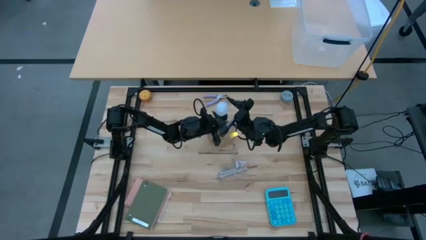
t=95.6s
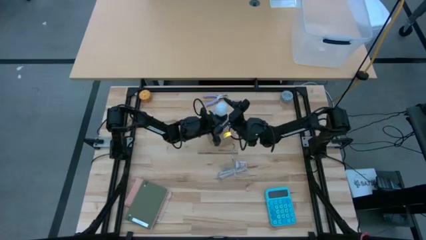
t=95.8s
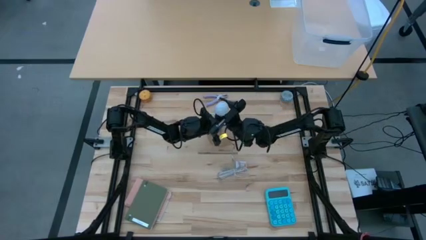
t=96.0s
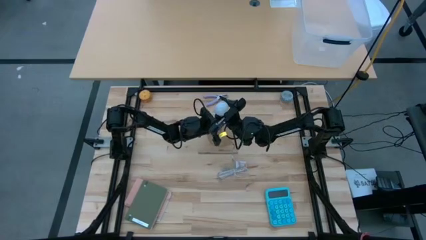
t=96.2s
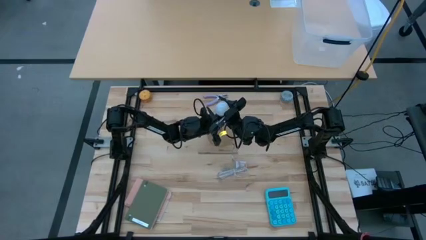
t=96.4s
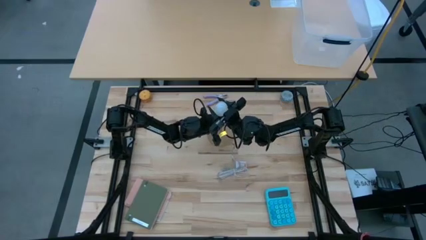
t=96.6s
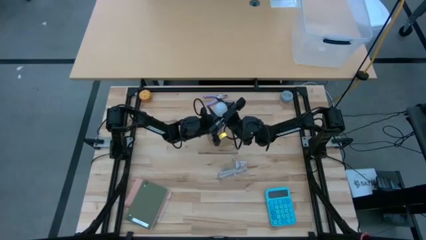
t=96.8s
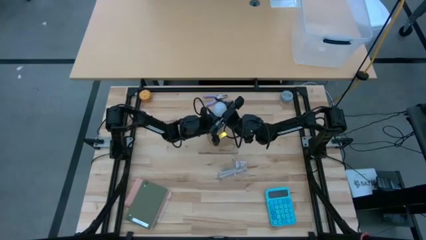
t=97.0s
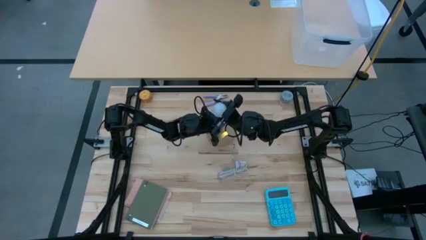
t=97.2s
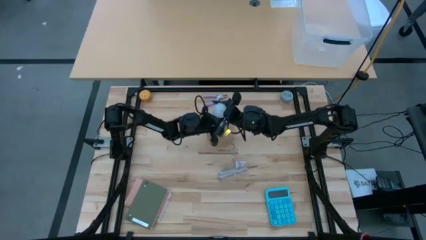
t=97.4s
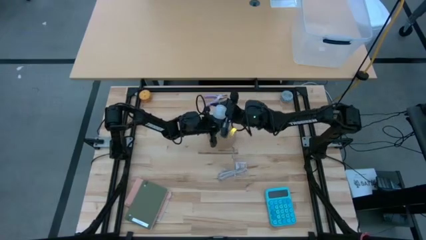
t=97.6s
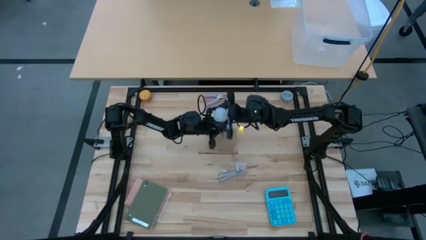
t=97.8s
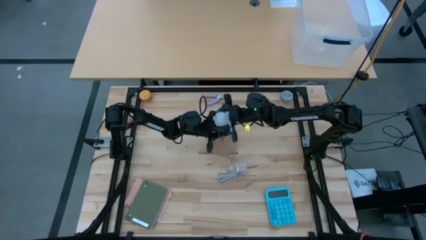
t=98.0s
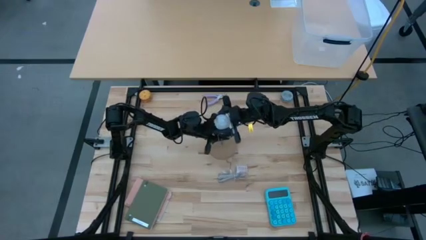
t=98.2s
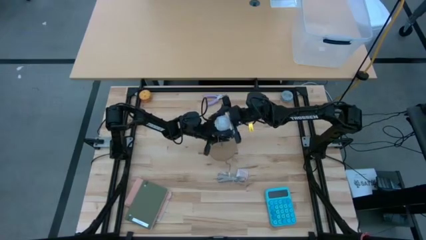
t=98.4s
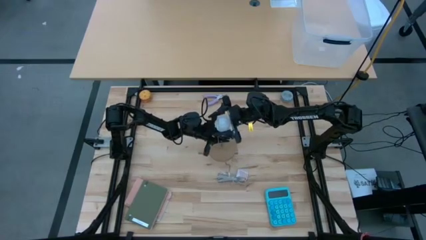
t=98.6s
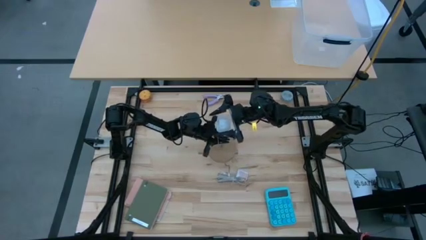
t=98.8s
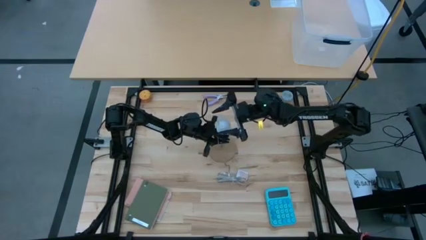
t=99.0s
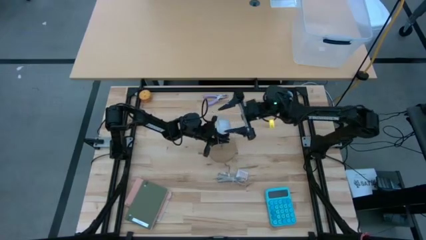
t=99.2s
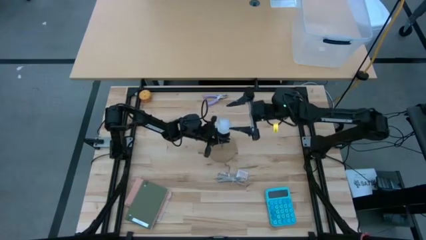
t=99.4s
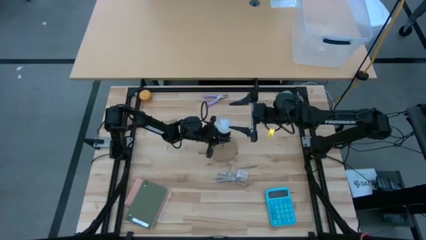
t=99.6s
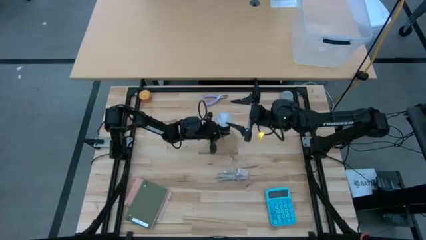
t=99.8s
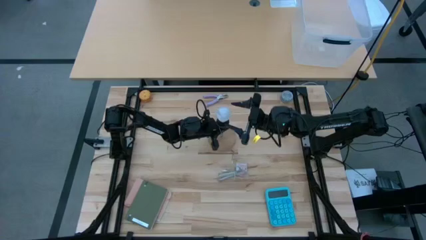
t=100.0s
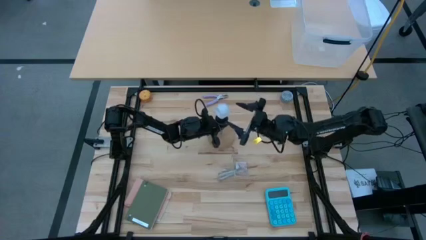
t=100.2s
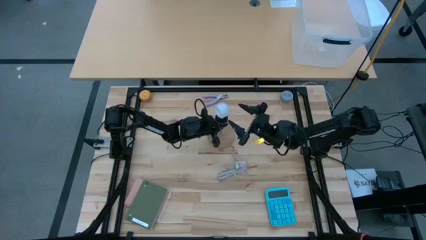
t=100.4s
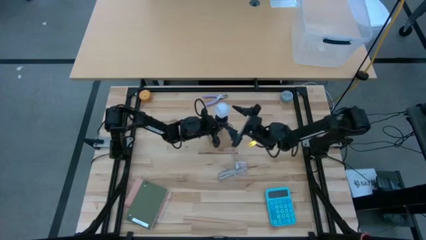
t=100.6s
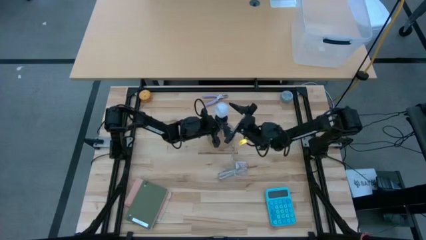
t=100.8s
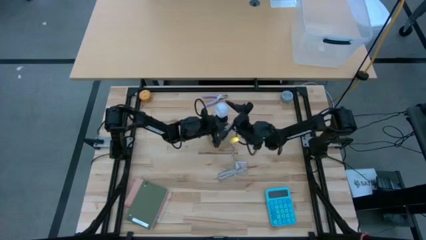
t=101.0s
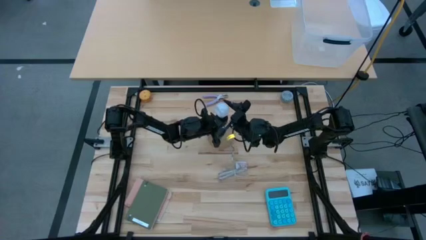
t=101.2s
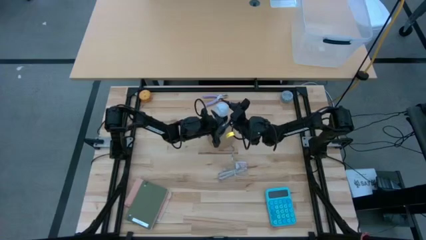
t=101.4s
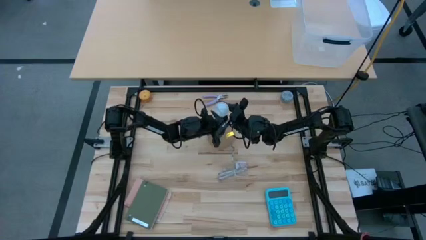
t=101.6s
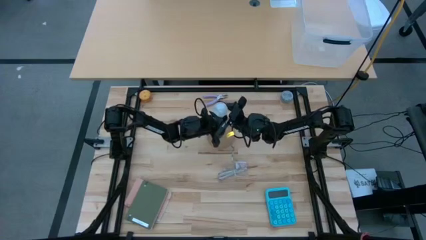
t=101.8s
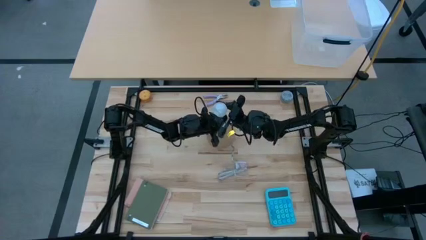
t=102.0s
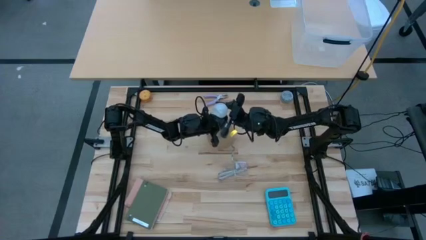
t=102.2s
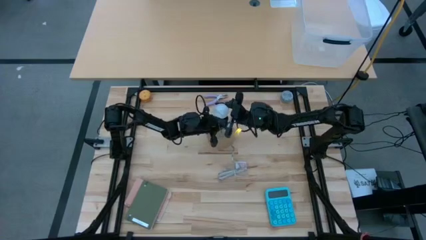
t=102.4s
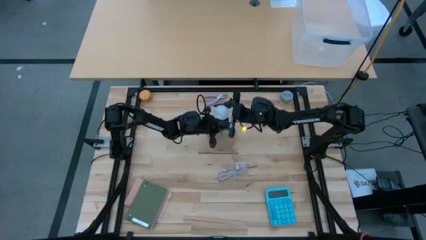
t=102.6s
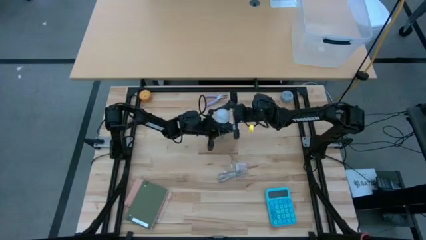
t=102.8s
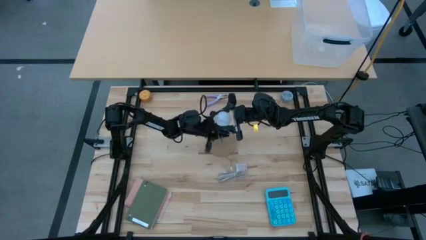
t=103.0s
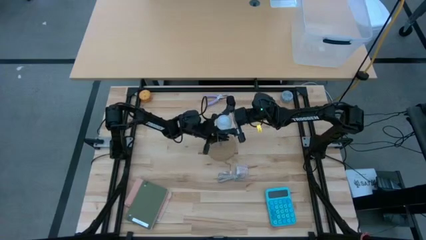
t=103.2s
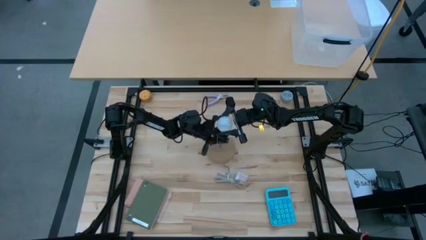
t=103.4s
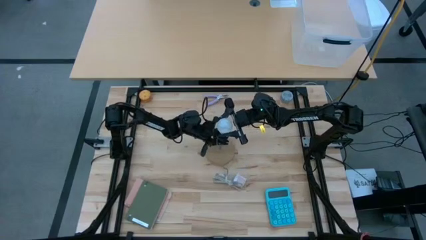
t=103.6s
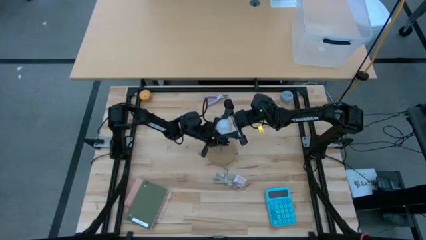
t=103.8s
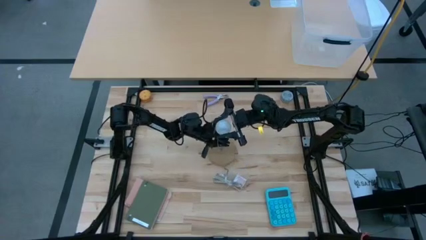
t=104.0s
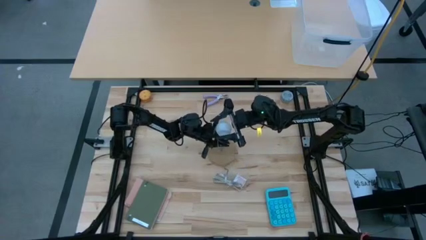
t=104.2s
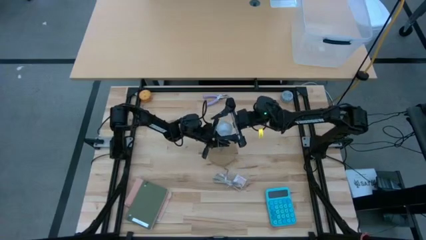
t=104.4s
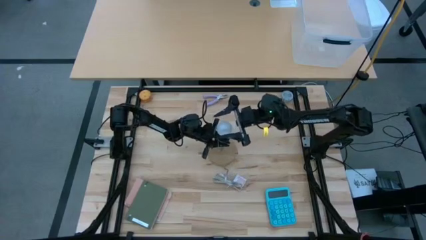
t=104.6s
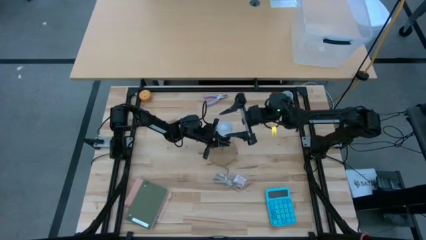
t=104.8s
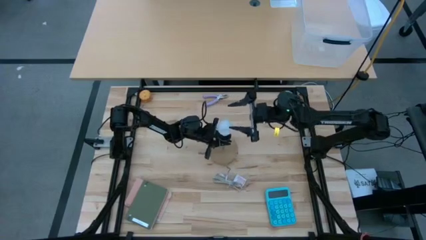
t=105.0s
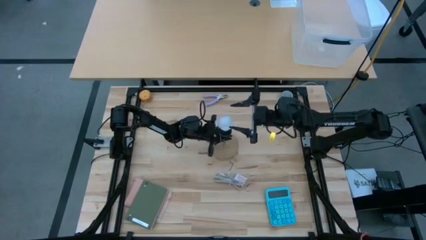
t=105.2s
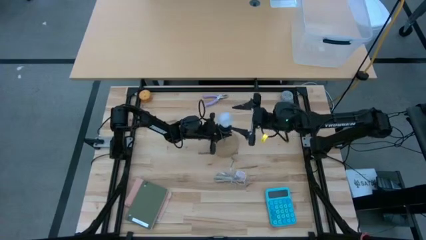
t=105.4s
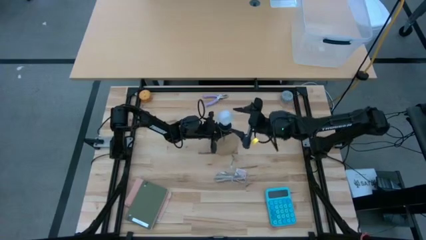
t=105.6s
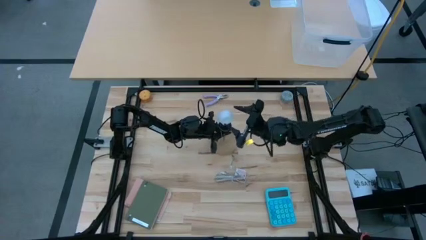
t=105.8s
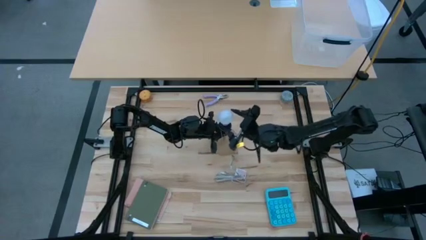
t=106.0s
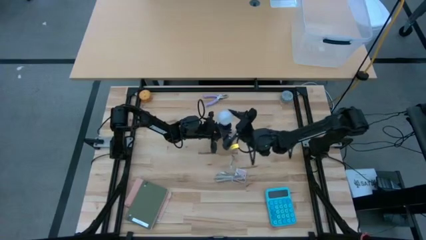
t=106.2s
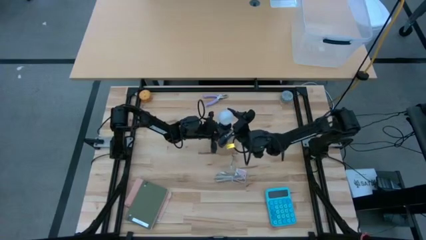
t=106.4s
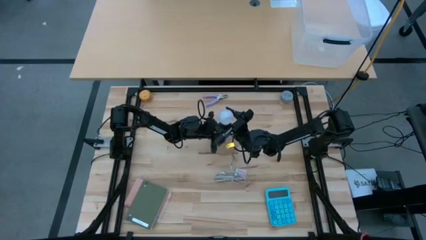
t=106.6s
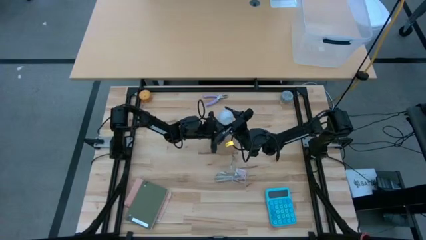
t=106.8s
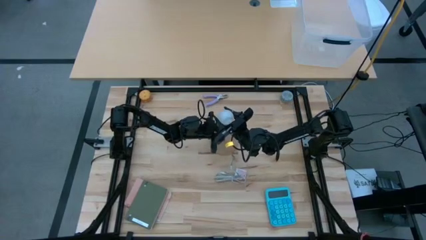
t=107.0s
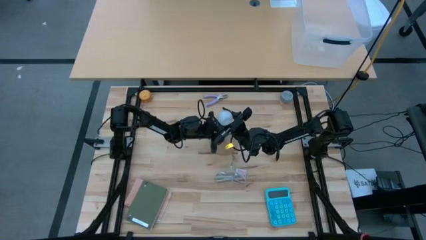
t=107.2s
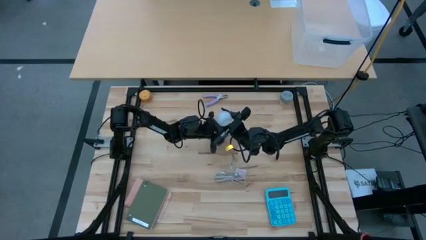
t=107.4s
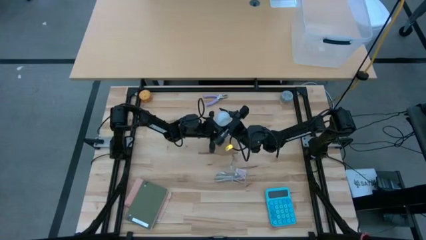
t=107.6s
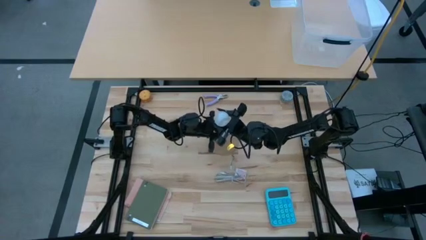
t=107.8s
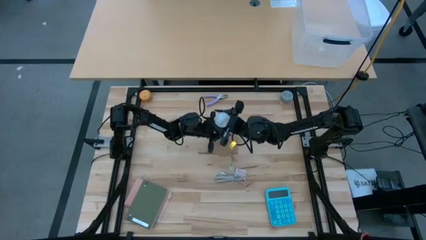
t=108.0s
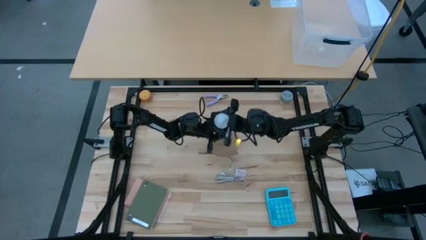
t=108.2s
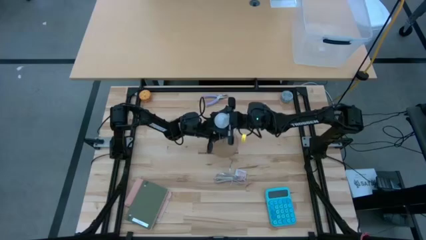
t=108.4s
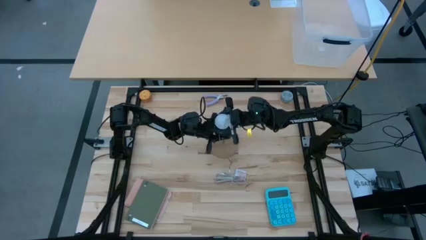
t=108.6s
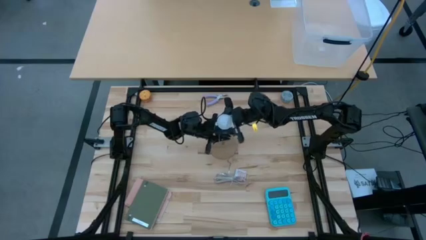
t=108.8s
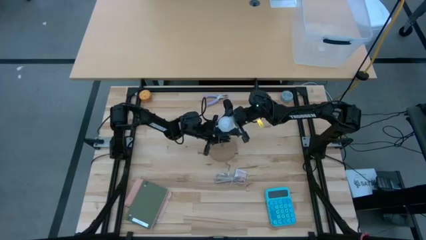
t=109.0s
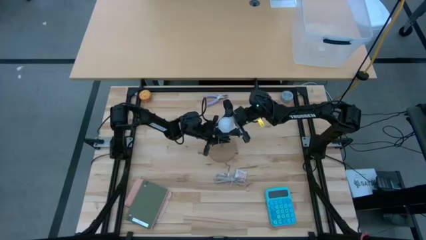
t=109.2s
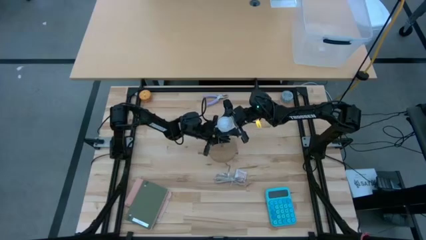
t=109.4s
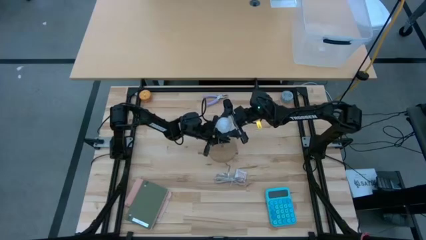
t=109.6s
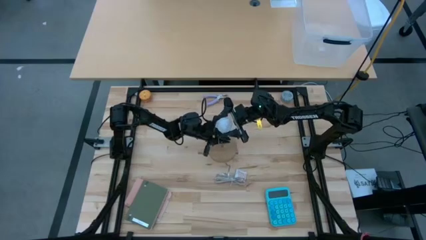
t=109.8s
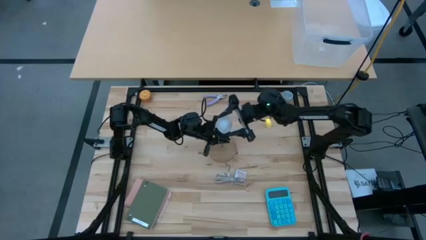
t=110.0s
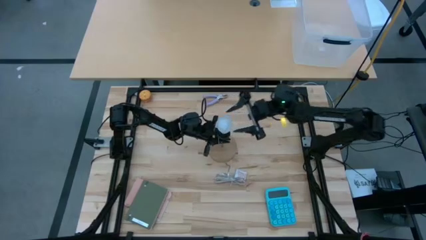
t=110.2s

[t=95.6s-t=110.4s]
Task: Screw lightbulb
Remove the light bulb from the brown lamp

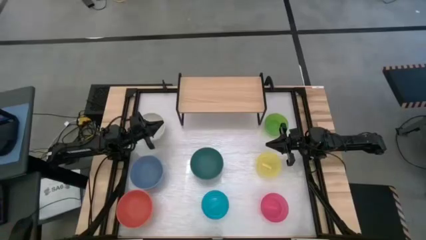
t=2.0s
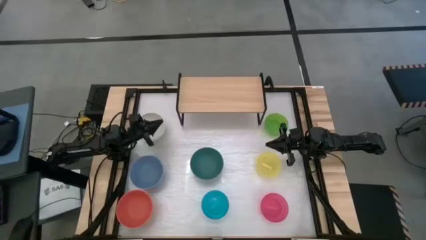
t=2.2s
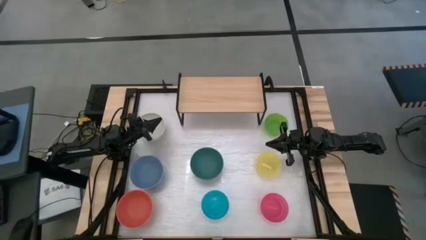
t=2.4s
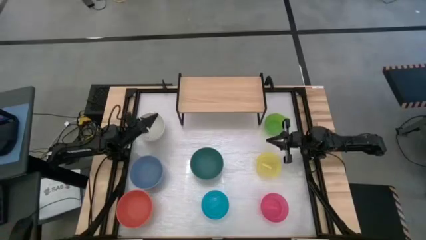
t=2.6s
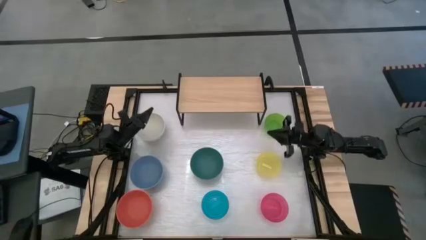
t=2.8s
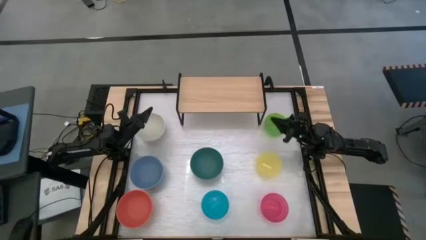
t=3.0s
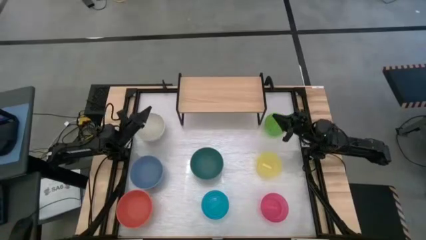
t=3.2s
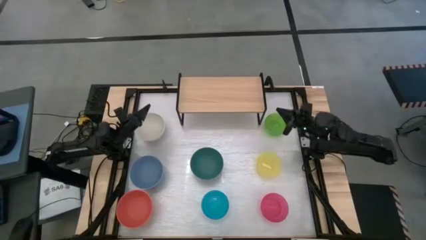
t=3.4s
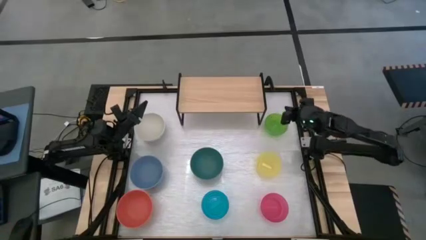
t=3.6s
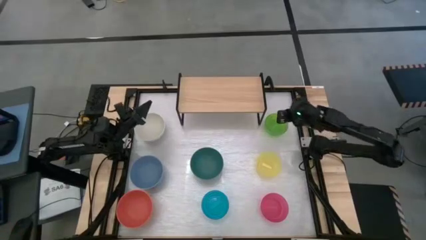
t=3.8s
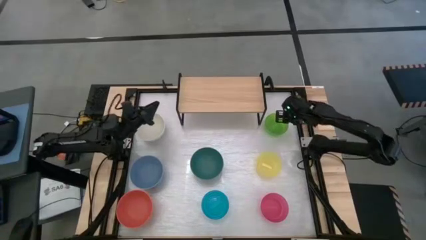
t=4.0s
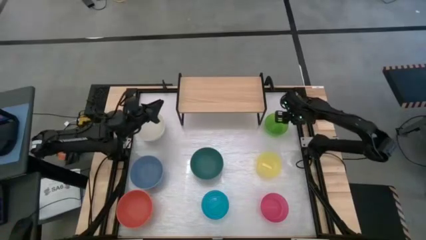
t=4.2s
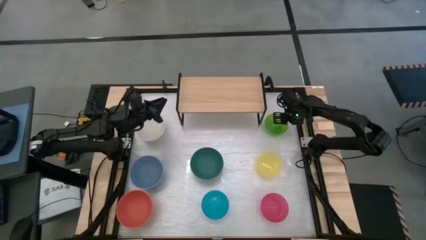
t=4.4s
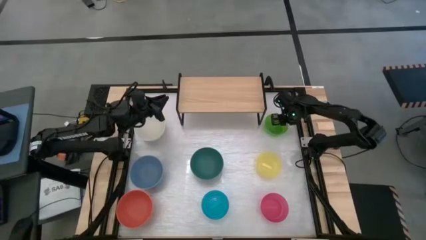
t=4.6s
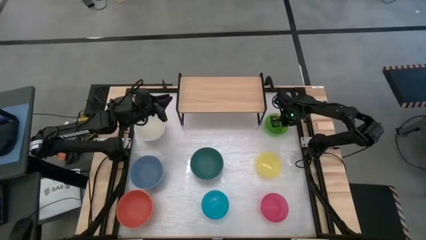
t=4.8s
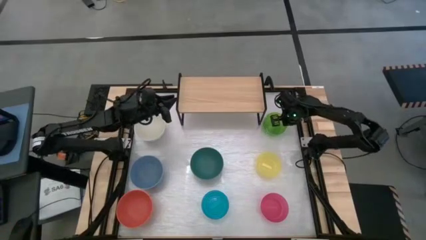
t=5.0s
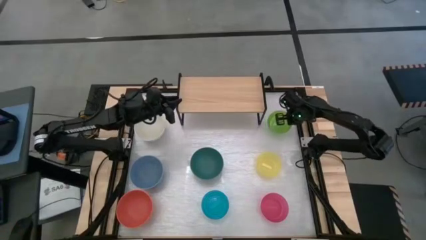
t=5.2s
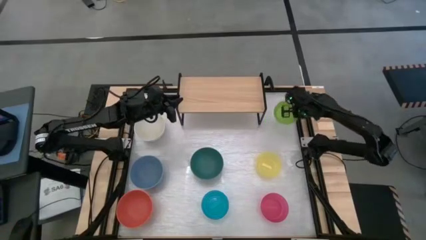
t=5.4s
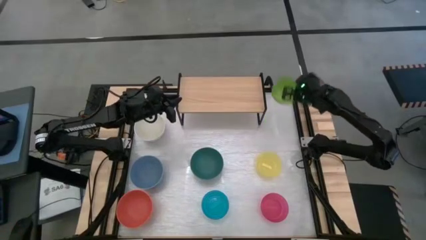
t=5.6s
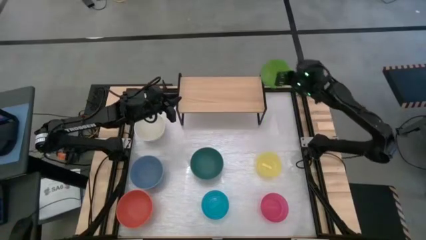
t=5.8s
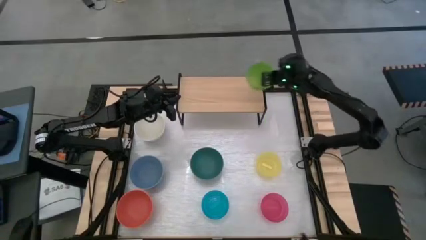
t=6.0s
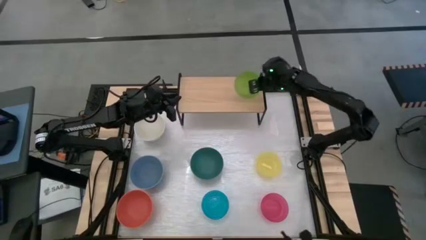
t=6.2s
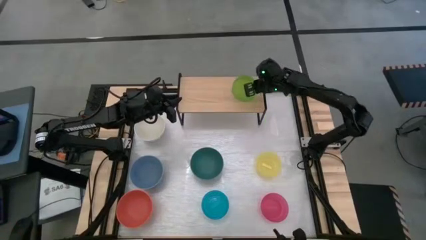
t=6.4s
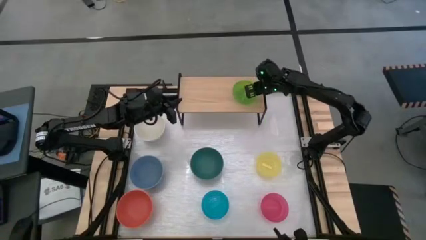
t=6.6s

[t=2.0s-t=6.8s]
Task: Place and stack bowls onto a shelf
Put the small green bowl on the shelf
